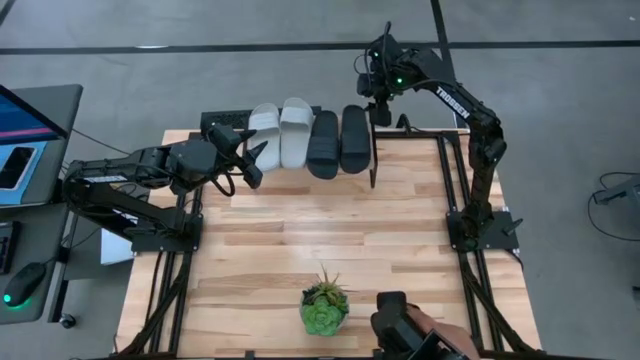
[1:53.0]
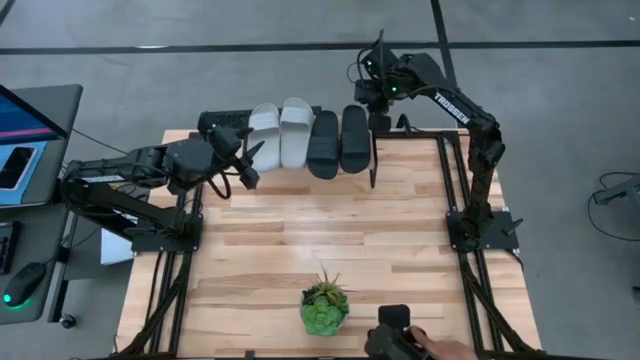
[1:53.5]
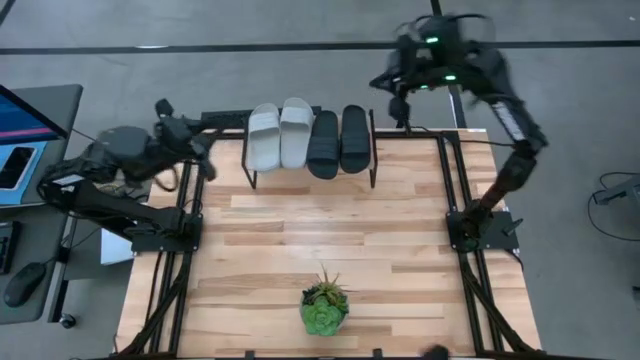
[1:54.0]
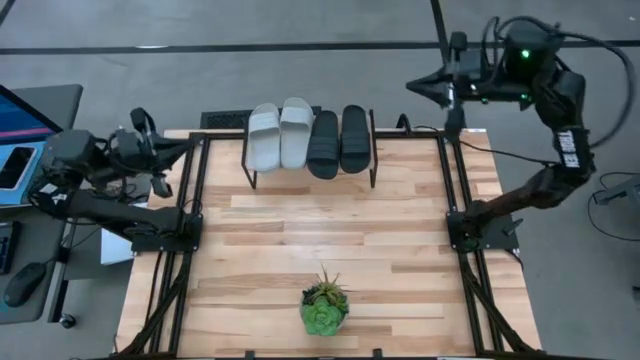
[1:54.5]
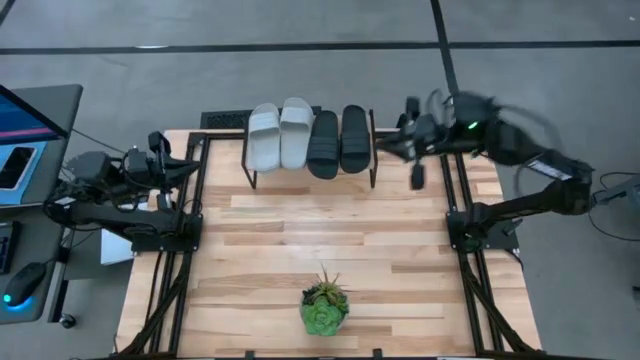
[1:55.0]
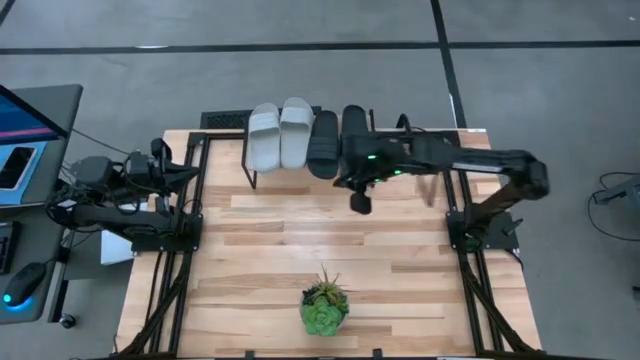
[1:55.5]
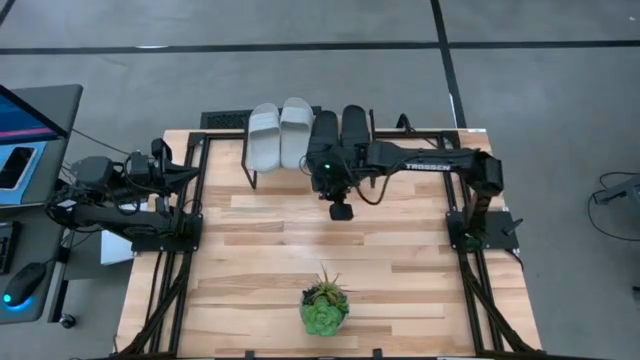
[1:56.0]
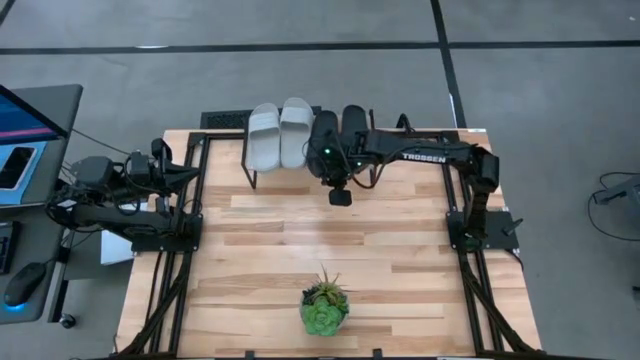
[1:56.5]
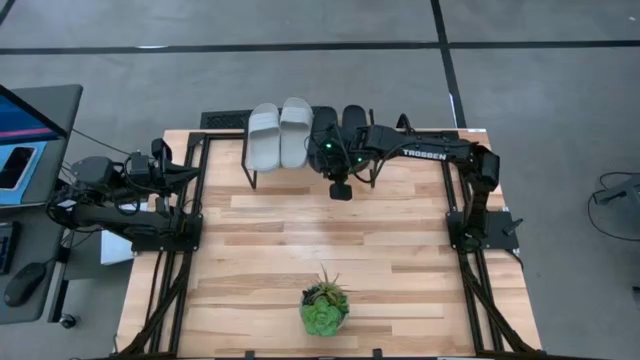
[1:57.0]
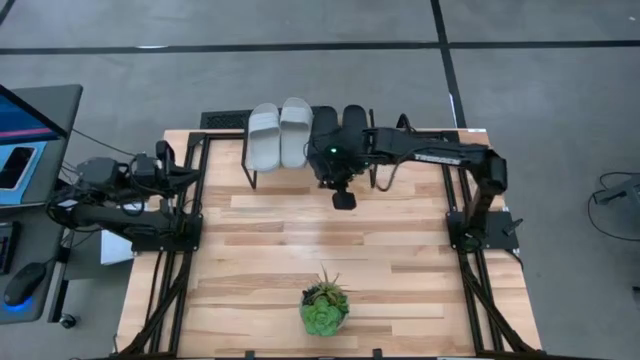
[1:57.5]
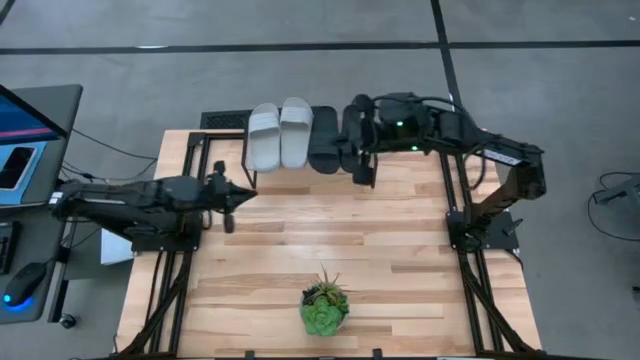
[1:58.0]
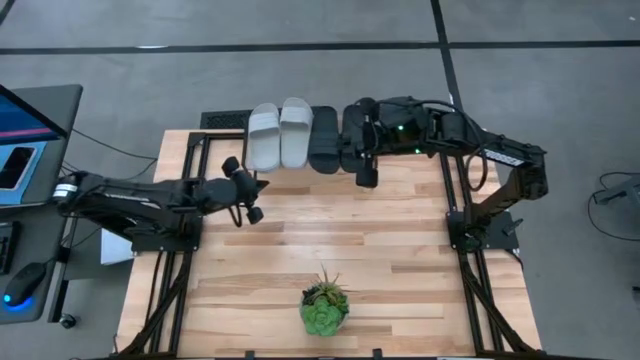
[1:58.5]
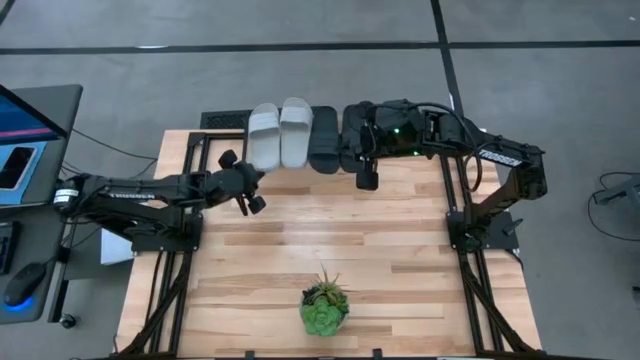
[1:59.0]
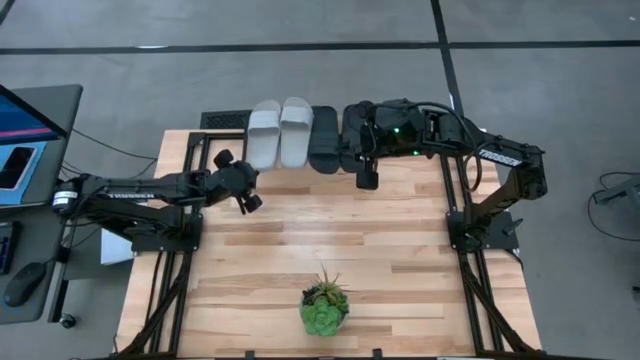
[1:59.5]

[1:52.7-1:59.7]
Task: Pick and place slides into the shelf
Adjust the slides on the shelf

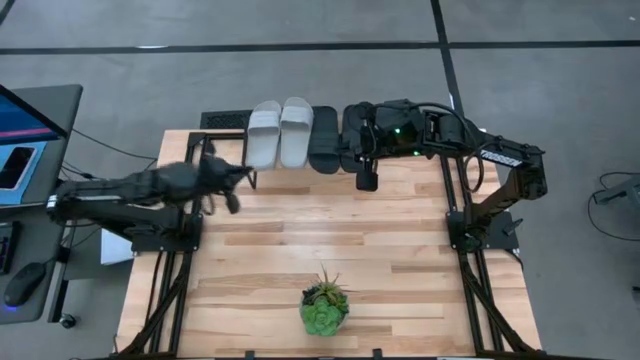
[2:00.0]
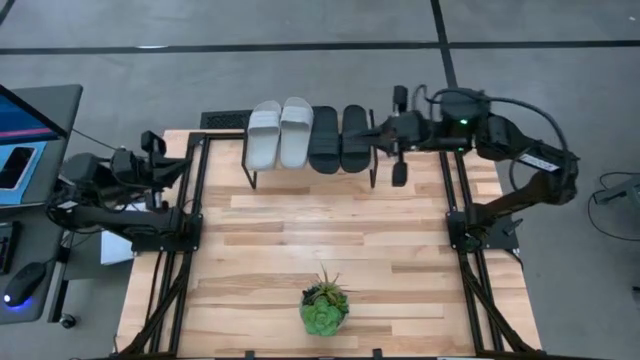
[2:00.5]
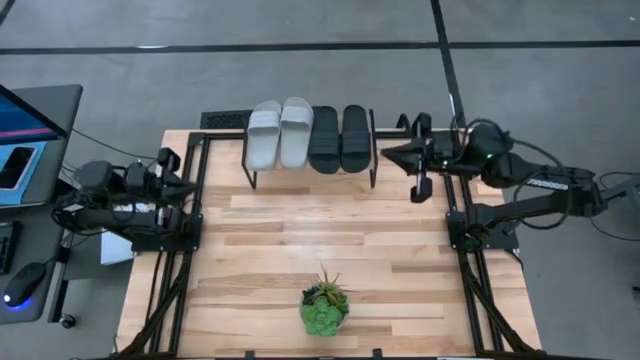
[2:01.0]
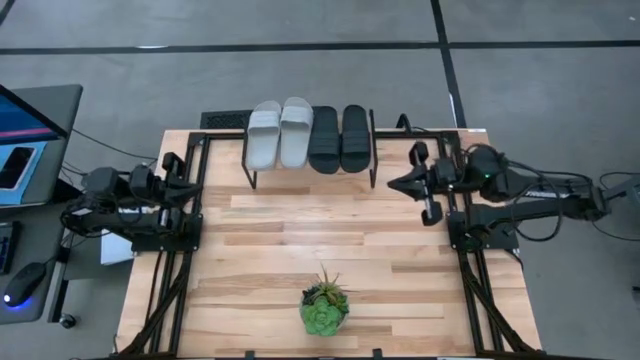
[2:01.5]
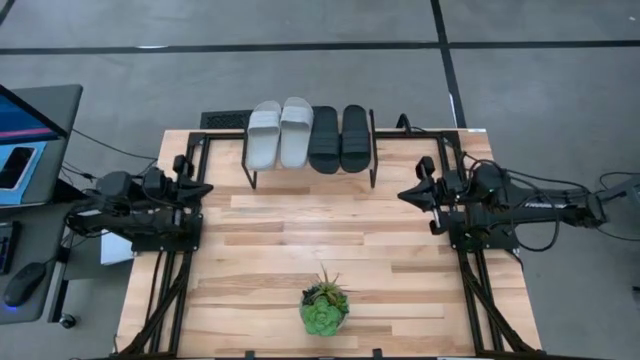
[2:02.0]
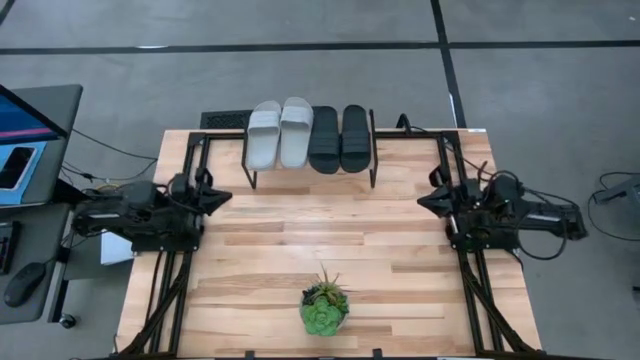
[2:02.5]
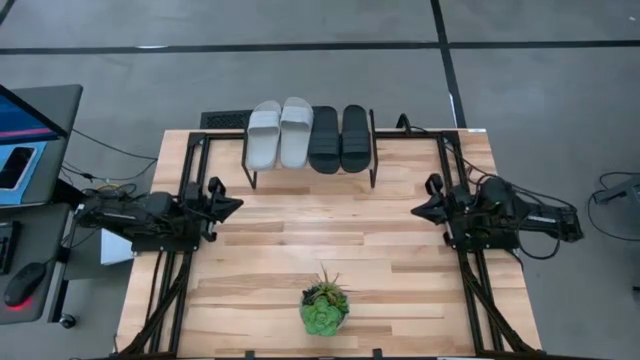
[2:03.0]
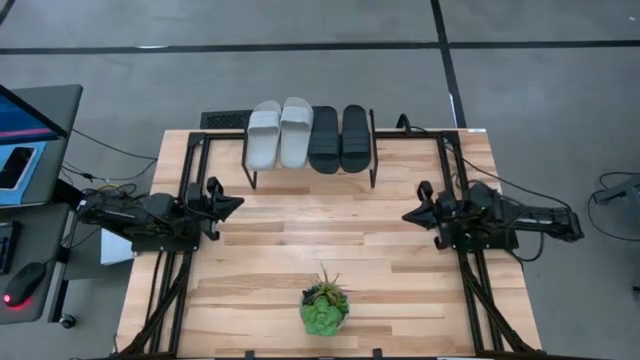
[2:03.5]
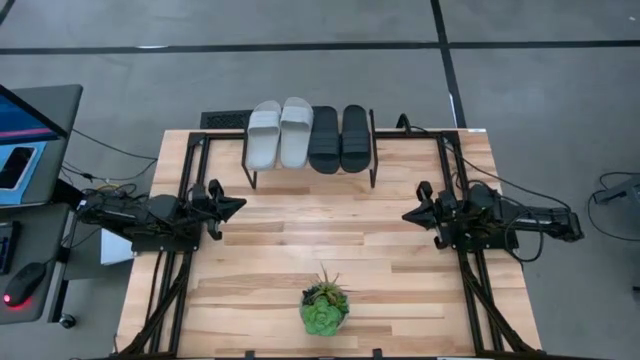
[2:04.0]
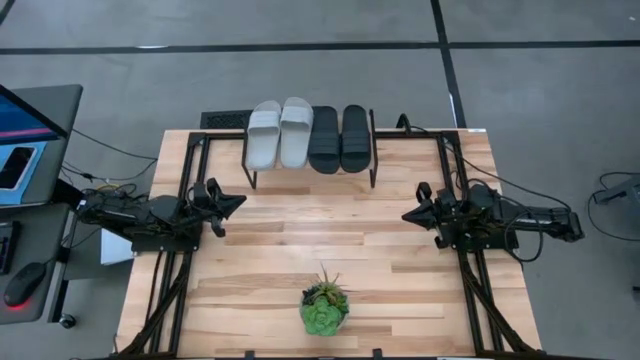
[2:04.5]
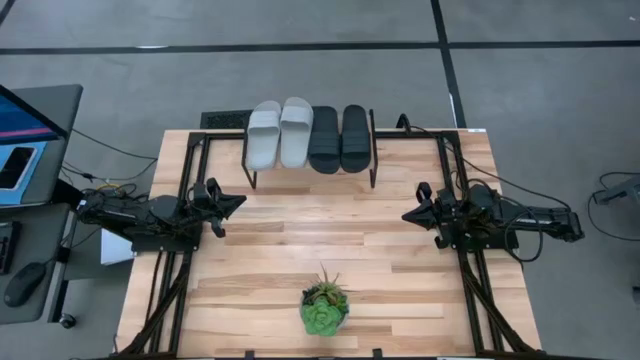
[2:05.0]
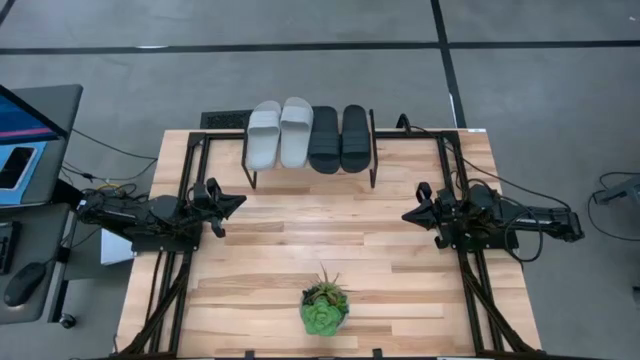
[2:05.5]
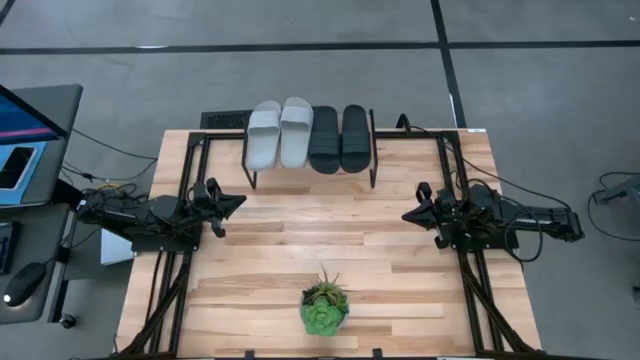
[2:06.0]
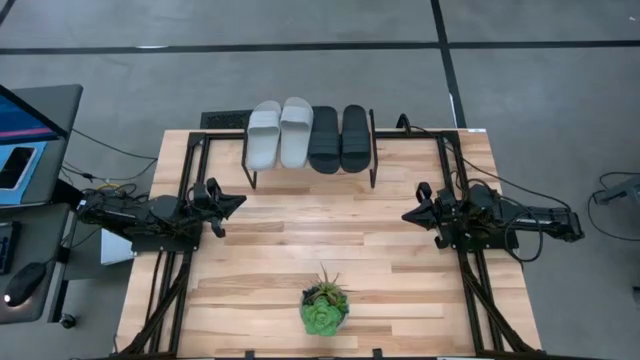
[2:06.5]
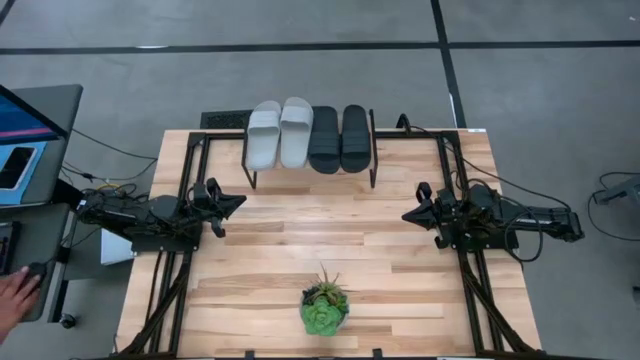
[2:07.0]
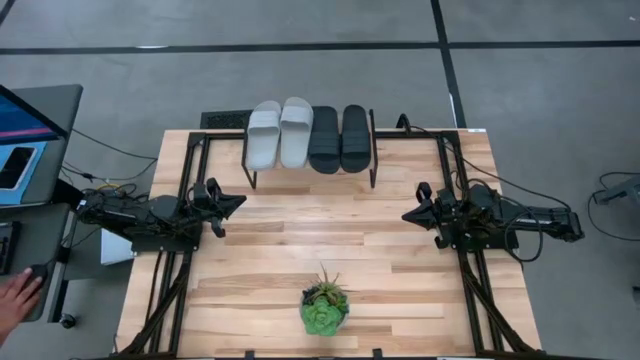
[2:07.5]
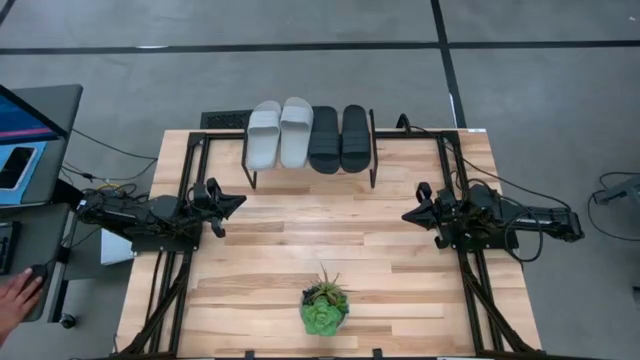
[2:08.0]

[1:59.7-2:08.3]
Return to Home Position

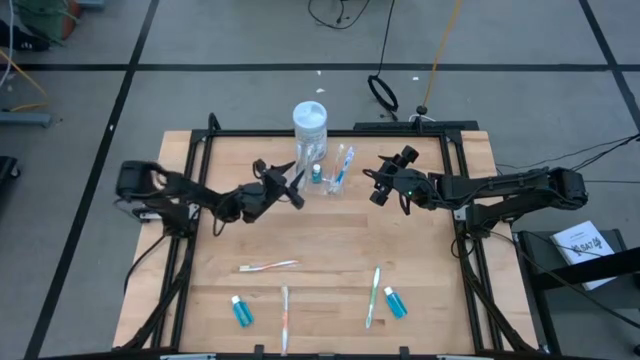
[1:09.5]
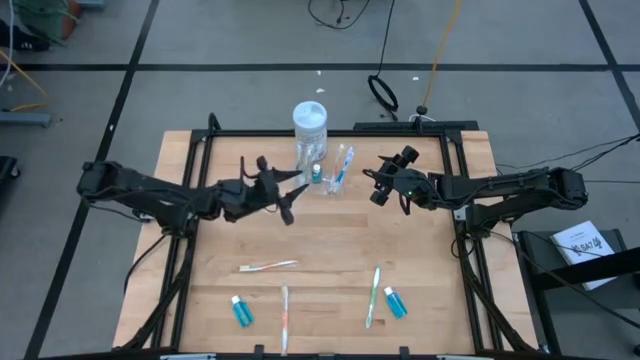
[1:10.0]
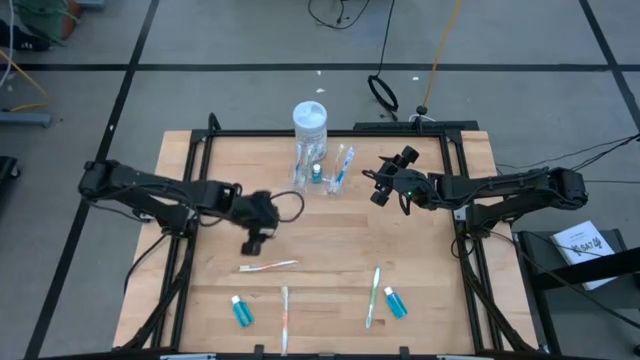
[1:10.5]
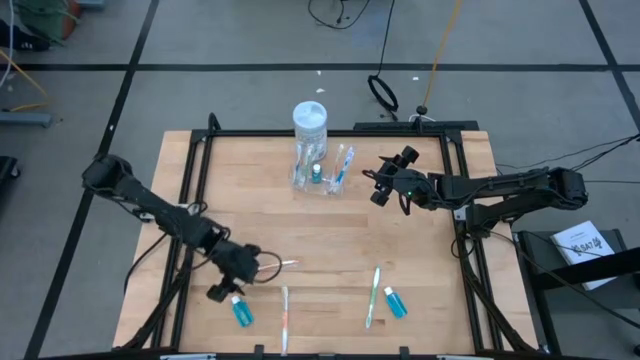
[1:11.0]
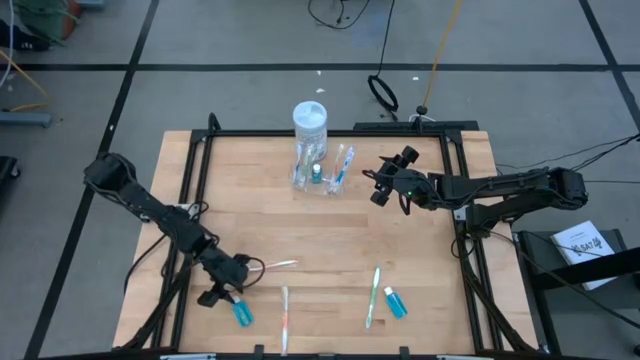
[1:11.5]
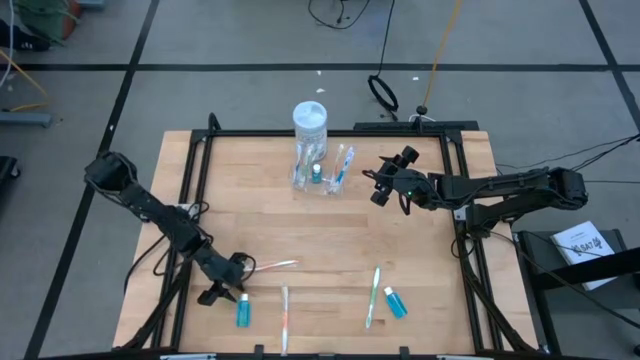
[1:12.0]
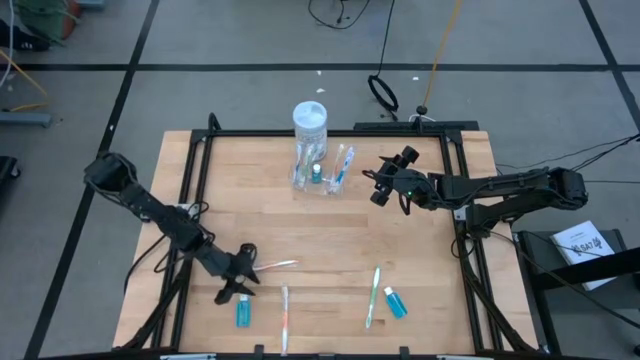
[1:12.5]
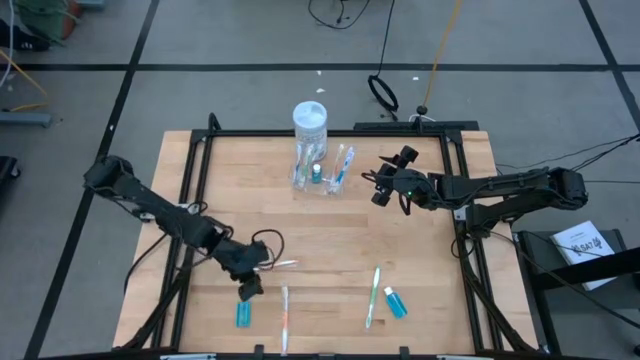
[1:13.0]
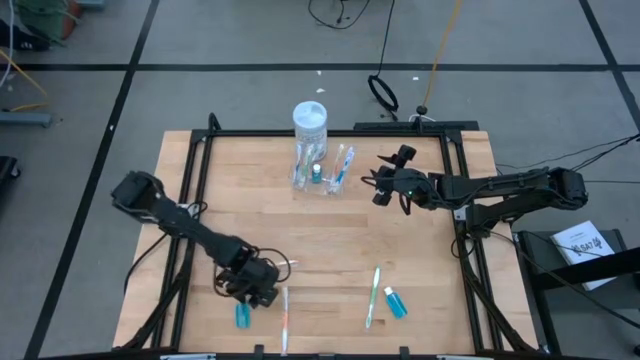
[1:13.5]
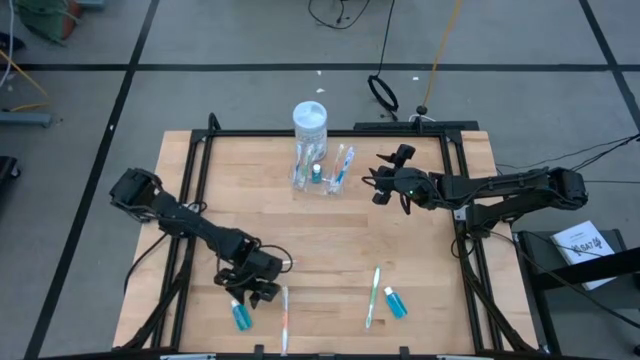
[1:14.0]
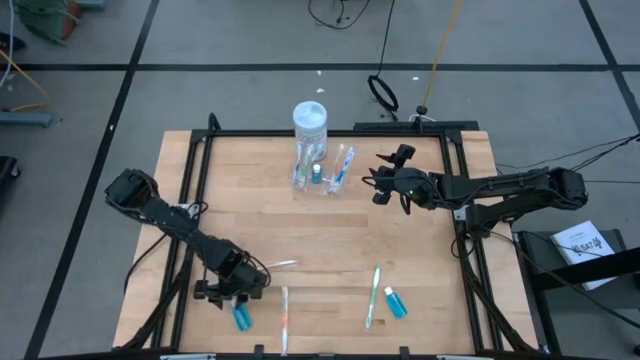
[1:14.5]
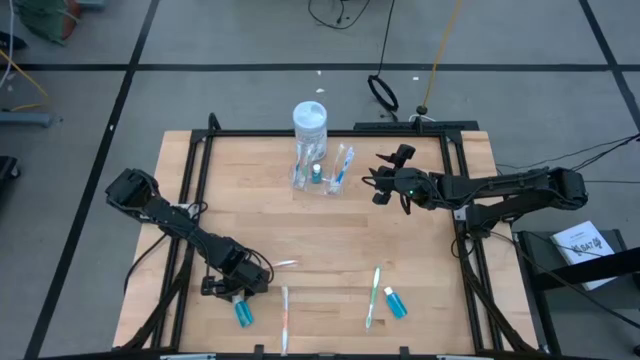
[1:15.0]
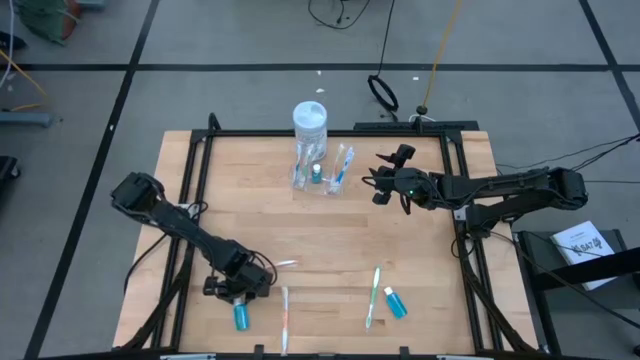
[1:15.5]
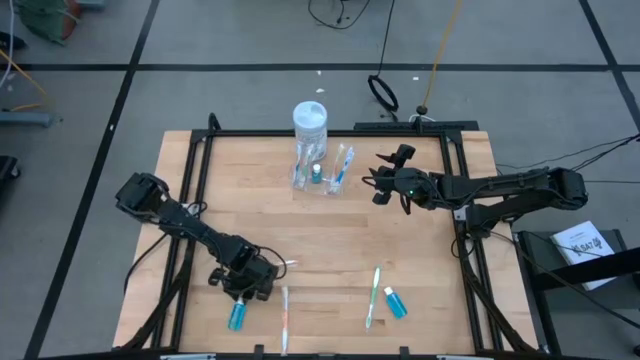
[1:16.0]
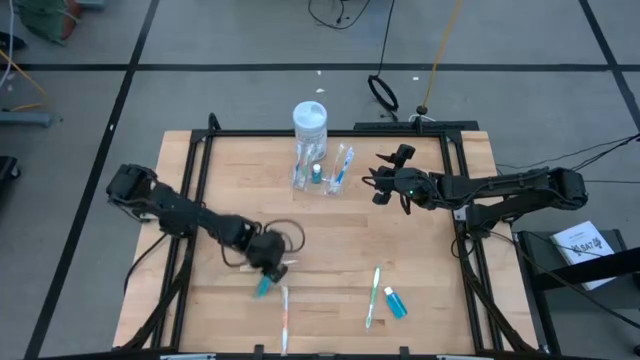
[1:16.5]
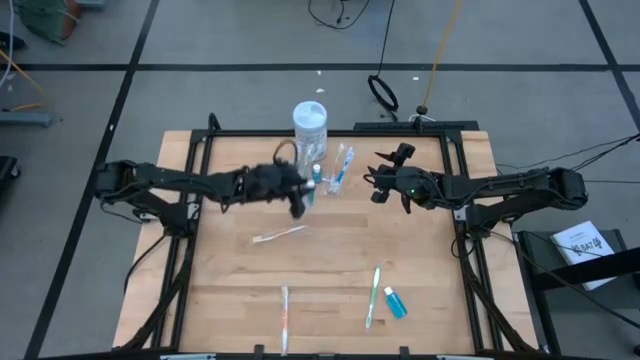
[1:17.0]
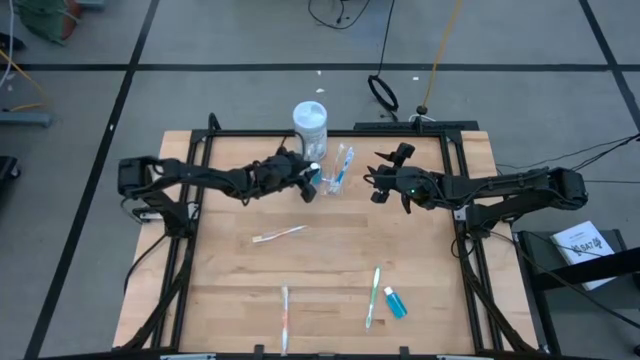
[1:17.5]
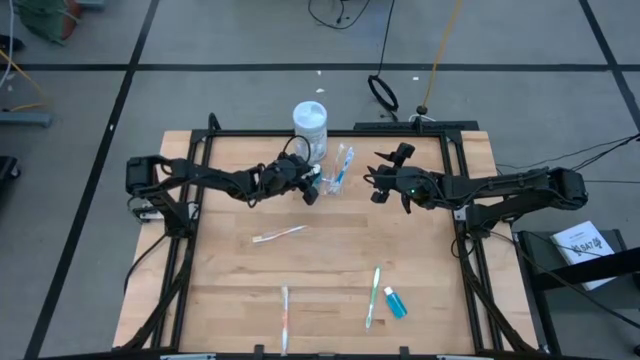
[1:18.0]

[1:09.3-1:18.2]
Task: Pick & Place toothbrushing station
Put the blue mouthwash bottle into the transparent organizer
